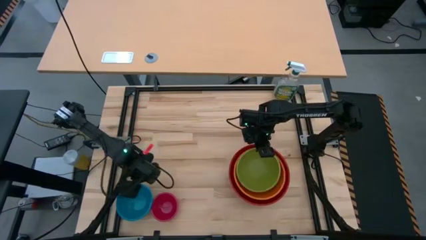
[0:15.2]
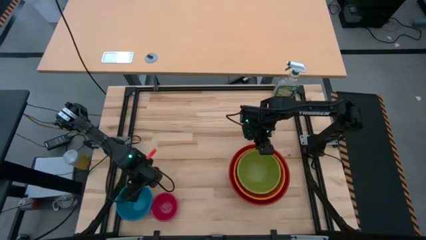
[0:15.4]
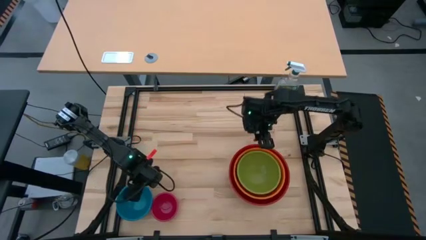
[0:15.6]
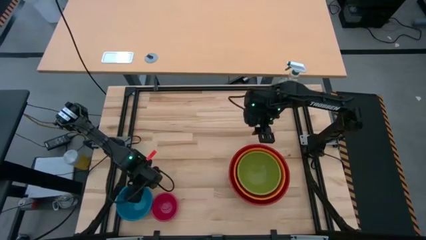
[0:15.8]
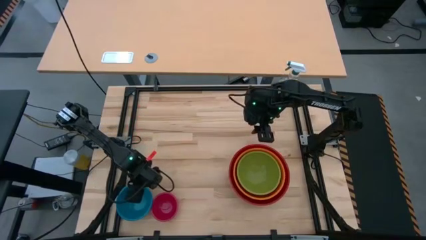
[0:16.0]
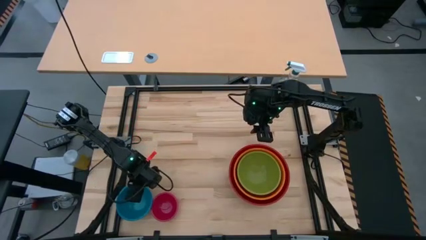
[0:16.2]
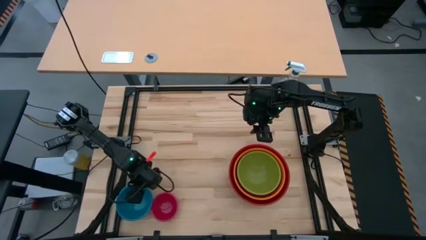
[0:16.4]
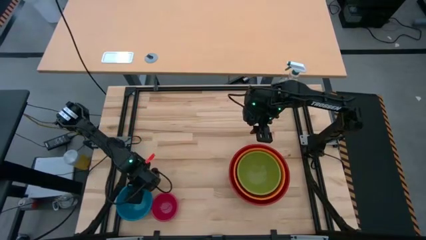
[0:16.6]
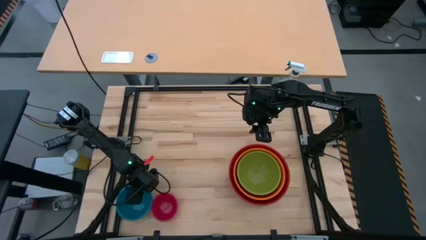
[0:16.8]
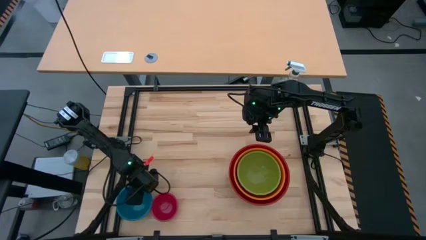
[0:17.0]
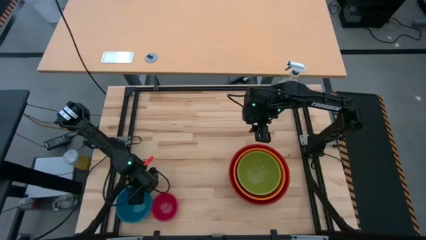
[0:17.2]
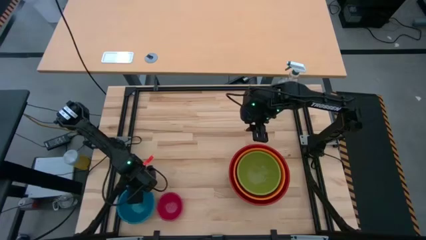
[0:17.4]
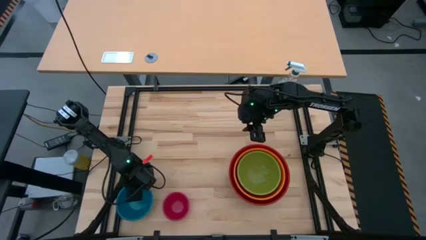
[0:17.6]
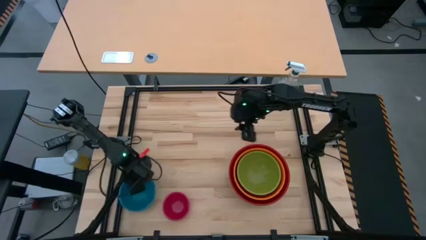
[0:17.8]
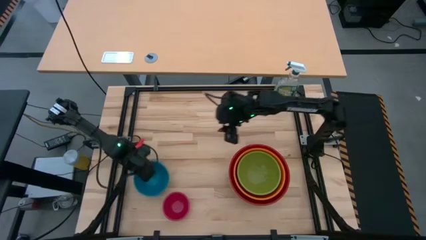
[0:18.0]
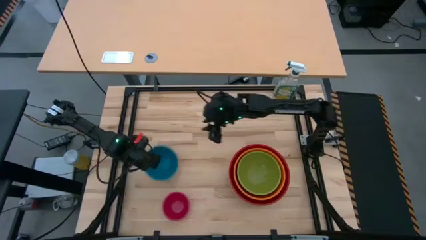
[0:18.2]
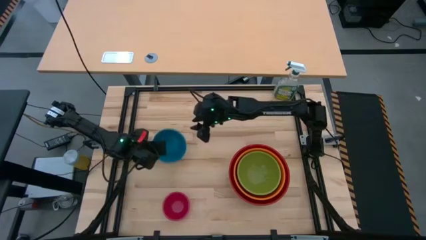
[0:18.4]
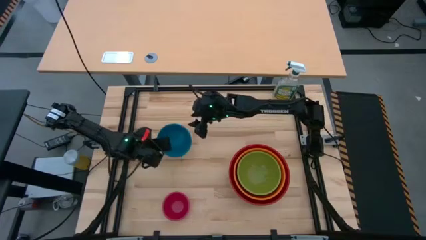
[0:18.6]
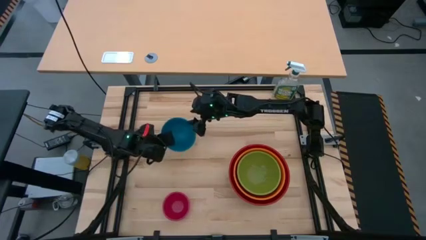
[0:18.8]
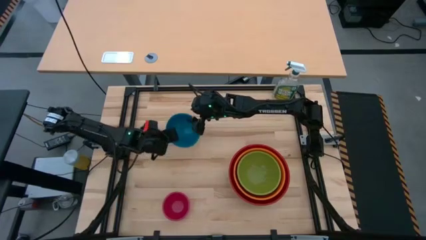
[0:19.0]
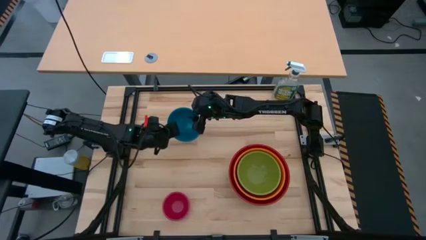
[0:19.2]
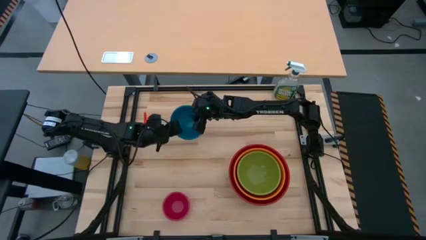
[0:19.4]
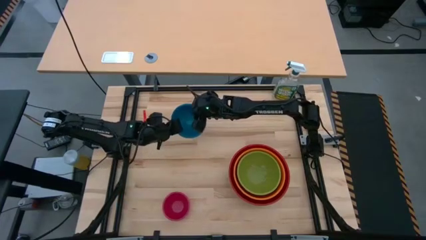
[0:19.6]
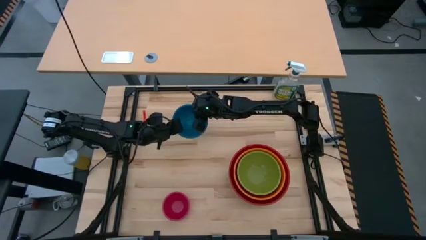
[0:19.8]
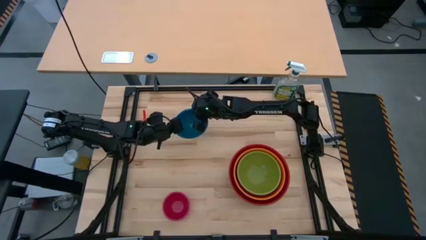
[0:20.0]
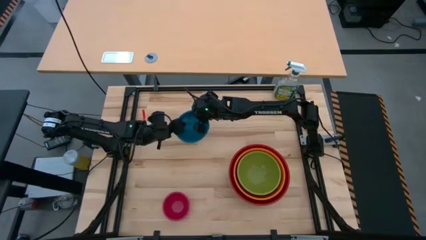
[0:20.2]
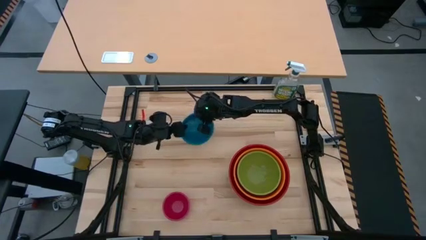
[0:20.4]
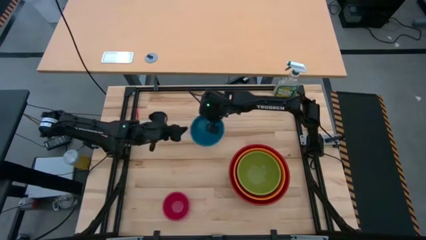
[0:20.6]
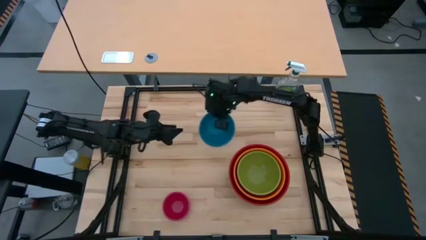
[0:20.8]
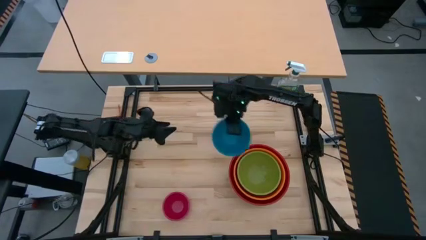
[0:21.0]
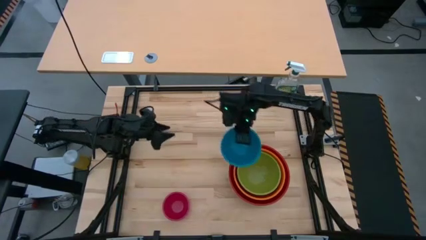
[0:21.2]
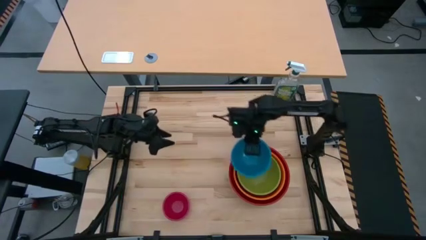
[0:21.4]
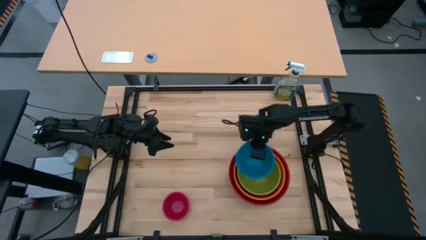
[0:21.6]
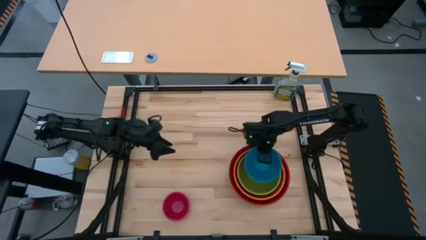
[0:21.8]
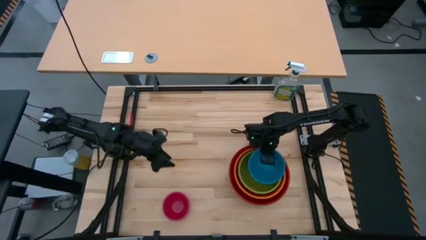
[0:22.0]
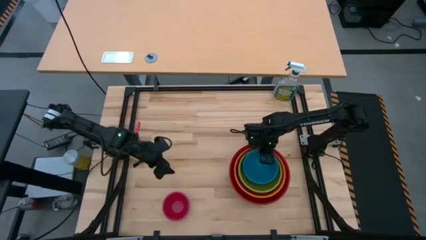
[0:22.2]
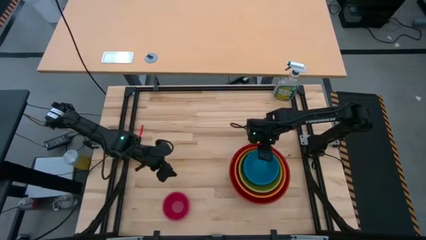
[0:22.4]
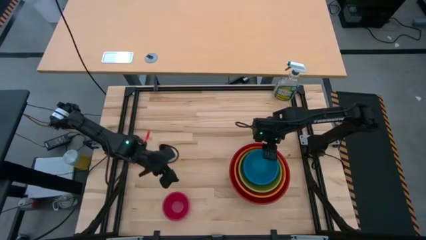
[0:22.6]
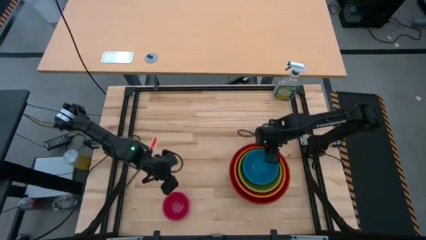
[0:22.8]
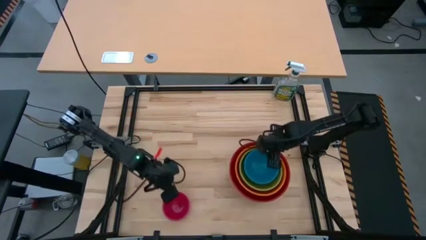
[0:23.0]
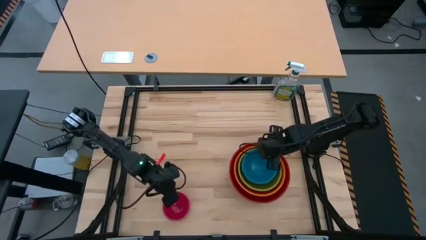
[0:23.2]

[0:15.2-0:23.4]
Stack the purple bowl on top of the green bowl

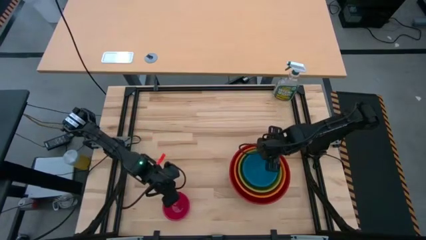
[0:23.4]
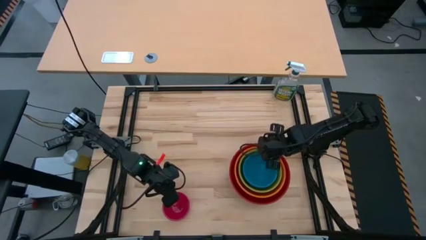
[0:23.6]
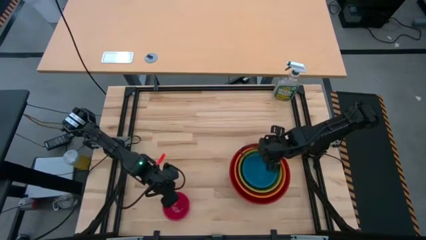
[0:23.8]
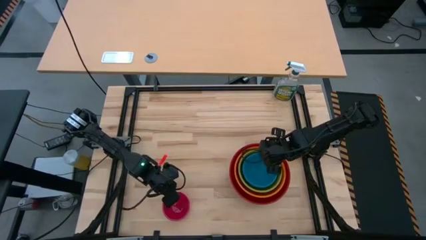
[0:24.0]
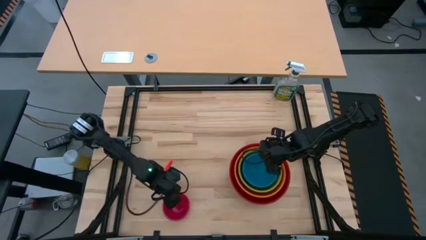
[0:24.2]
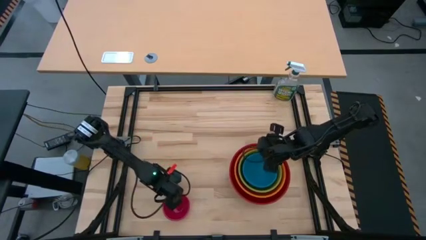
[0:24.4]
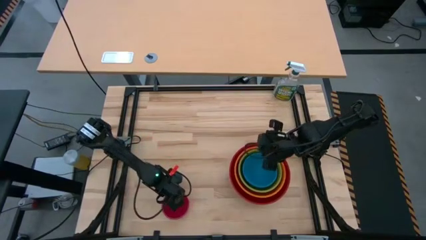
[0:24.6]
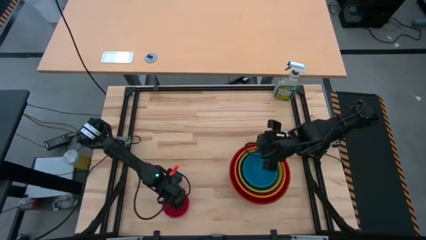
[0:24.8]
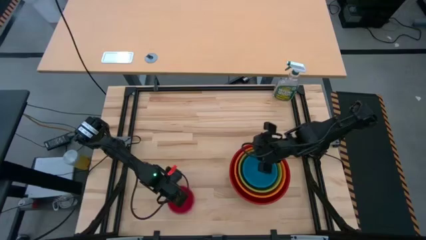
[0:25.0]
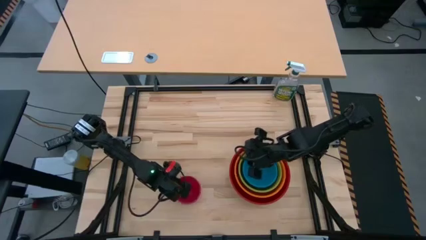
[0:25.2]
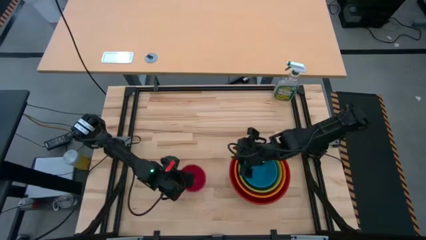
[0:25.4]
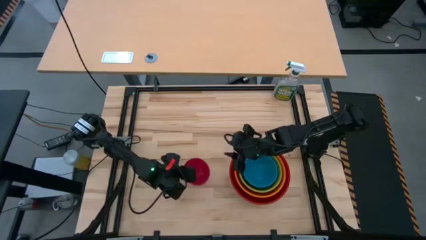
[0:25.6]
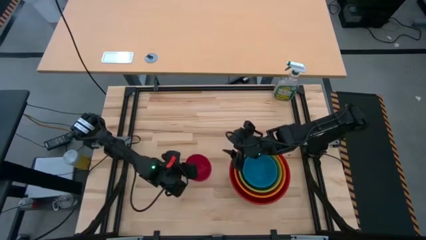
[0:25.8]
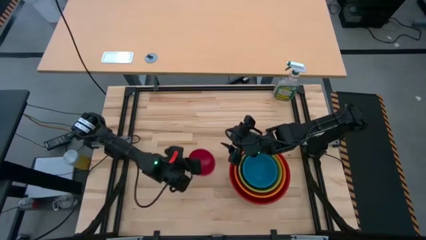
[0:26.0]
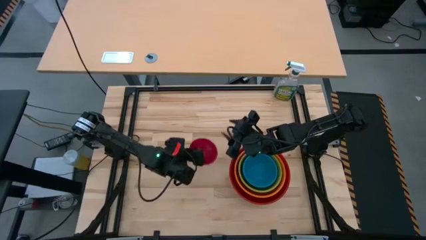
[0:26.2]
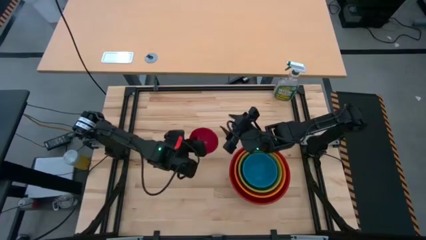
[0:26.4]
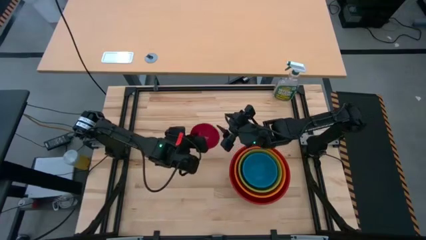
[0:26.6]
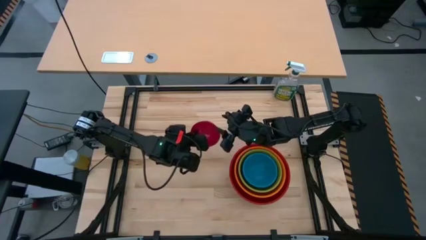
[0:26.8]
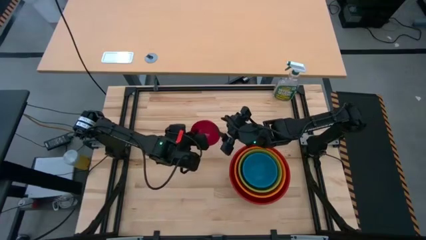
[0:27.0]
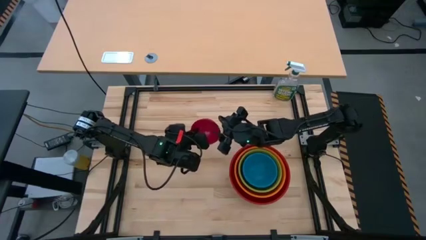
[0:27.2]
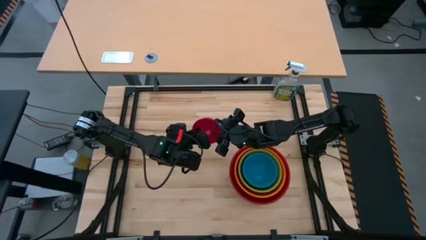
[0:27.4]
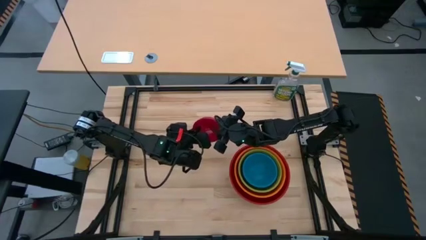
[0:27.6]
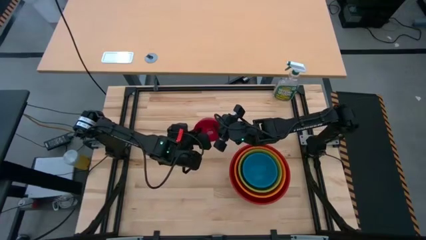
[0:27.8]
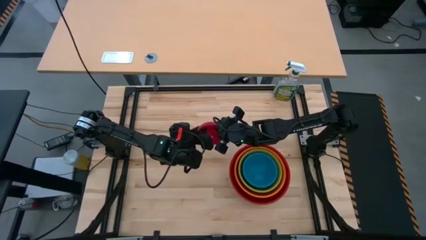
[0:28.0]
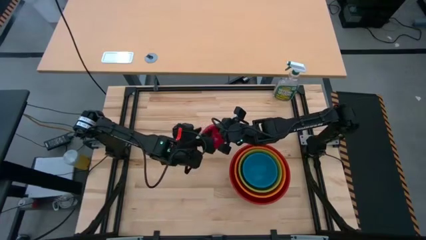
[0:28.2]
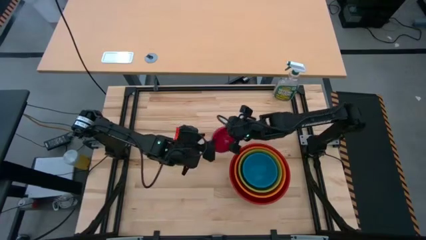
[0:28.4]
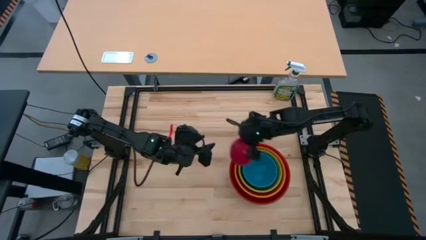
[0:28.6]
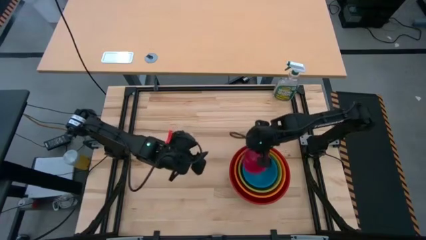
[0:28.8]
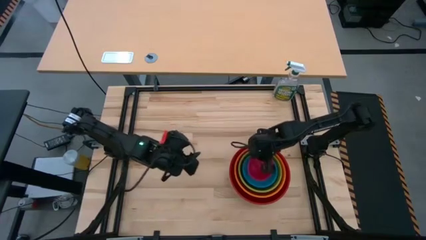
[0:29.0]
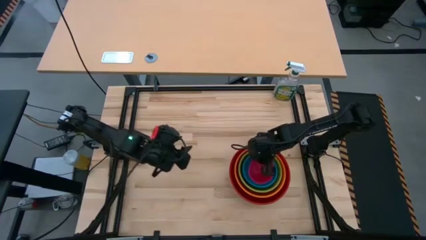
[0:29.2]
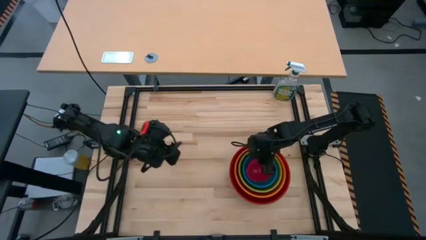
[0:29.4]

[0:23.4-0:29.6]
Stack the pink bowl on top of the purple bowl
